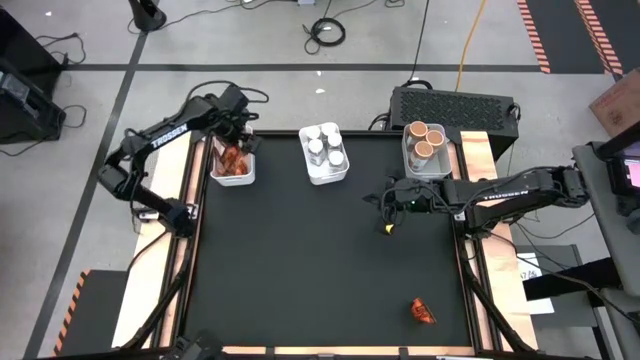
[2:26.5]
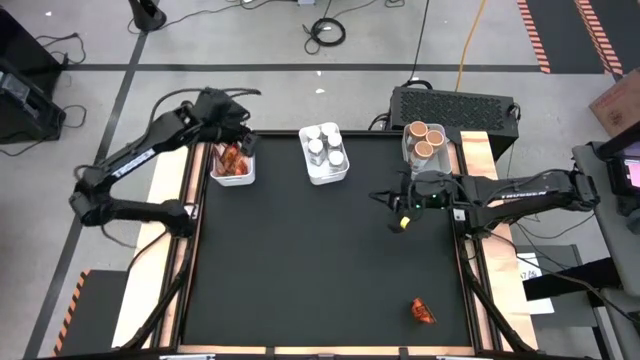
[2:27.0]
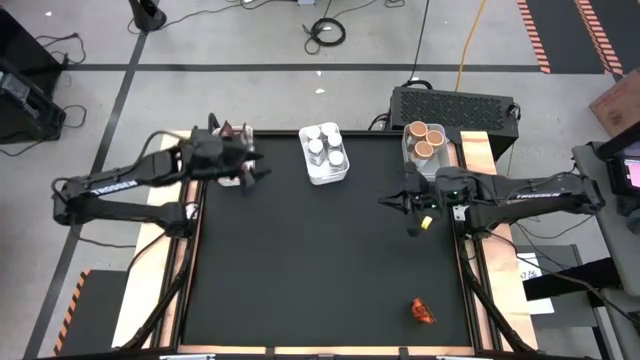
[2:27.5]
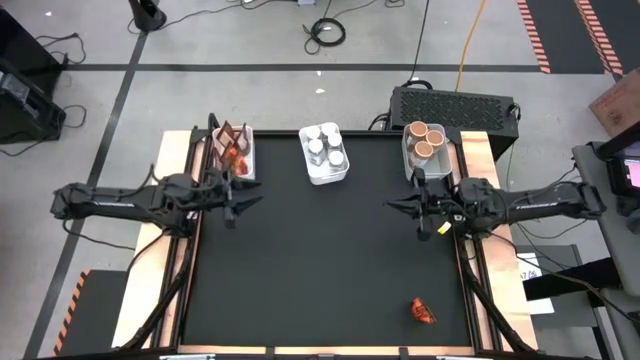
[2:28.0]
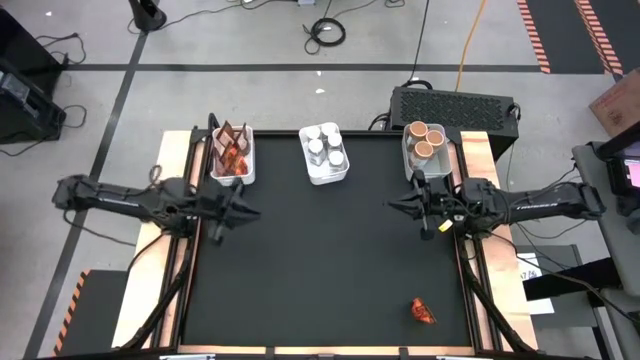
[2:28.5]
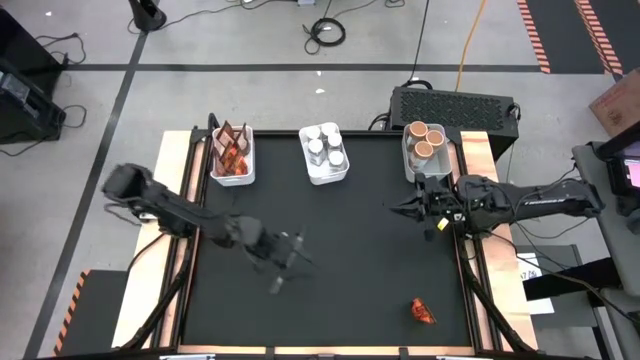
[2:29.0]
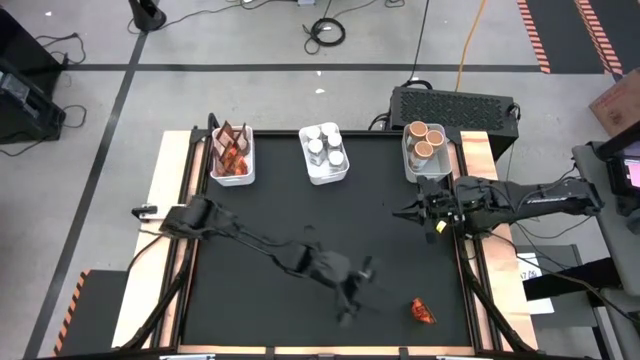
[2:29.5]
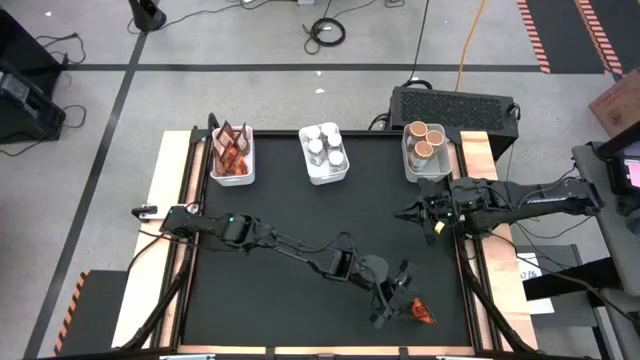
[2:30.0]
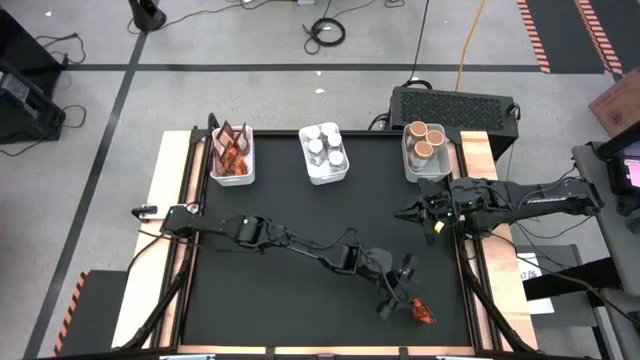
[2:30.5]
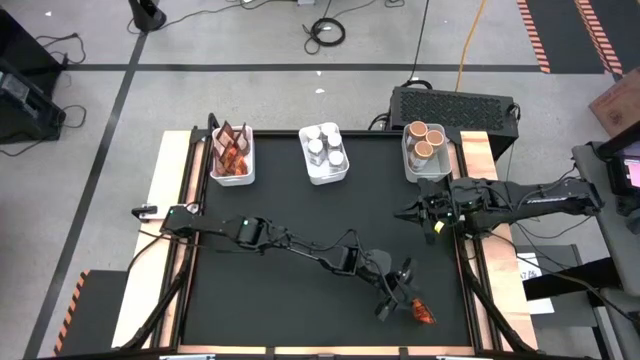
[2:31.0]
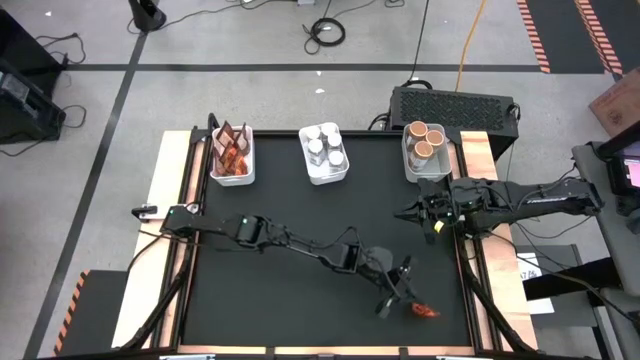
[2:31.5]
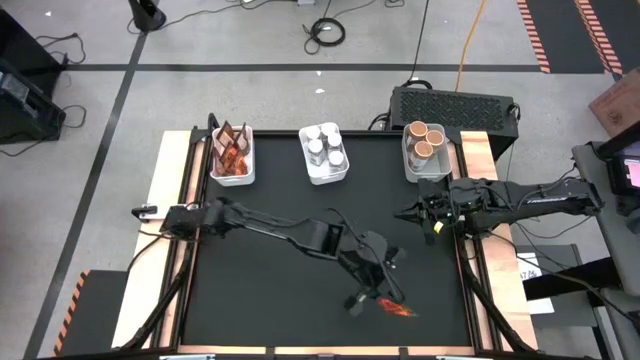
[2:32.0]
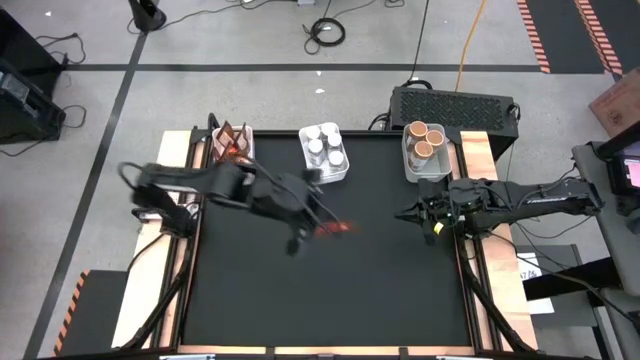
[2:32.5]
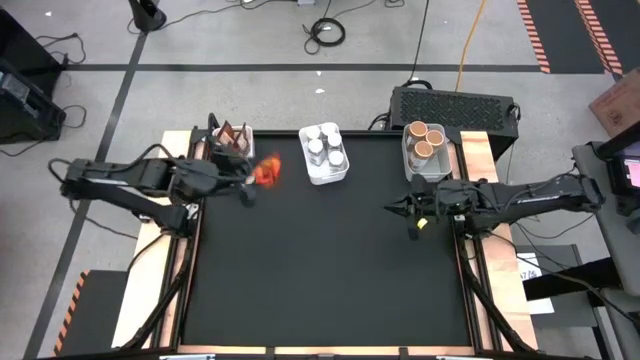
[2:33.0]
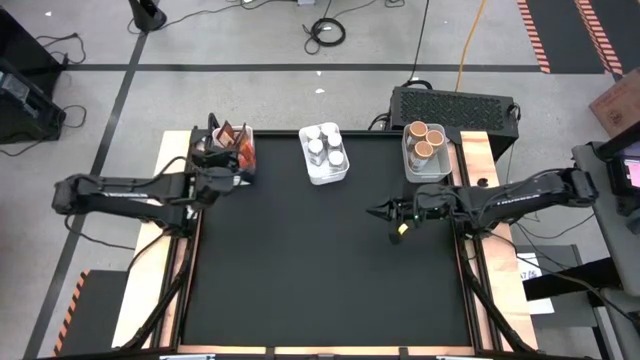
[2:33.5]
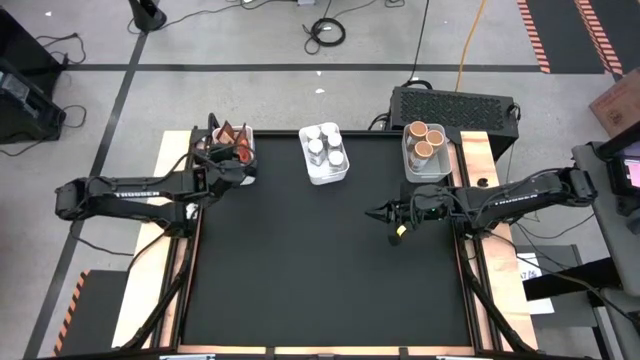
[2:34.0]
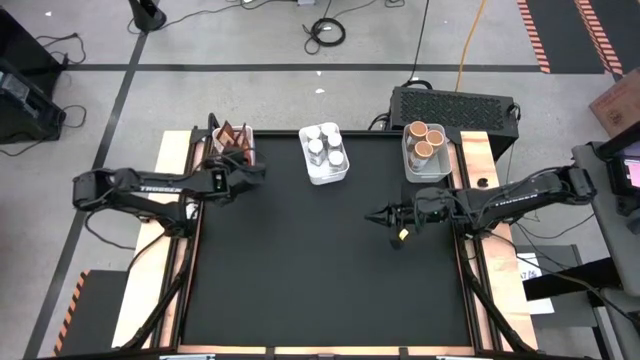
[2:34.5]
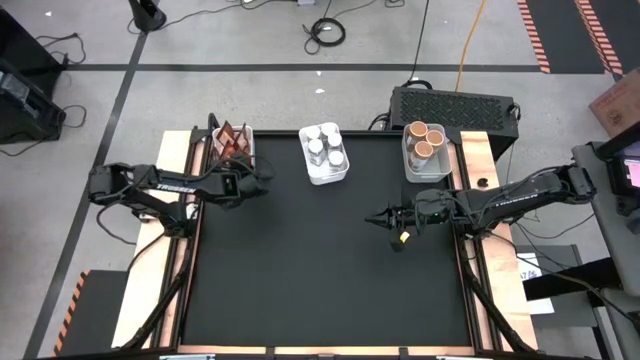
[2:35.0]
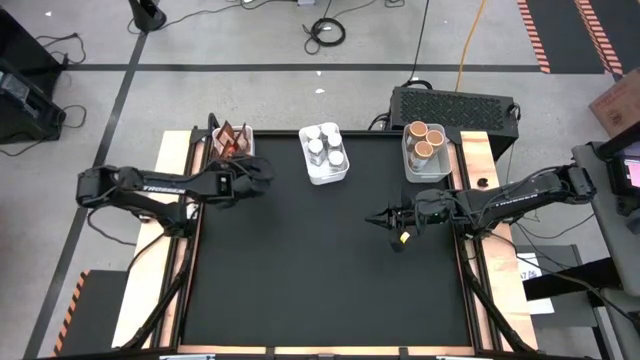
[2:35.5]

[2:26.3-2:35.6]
Task: Sort spices by type
Put the orange seasoning pack into the left white bin

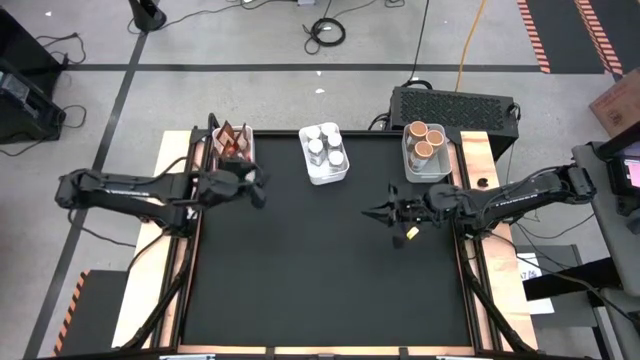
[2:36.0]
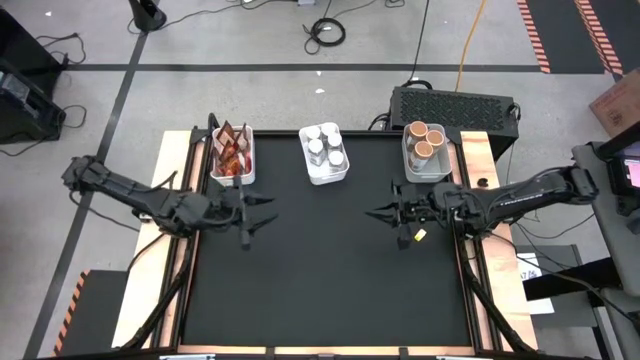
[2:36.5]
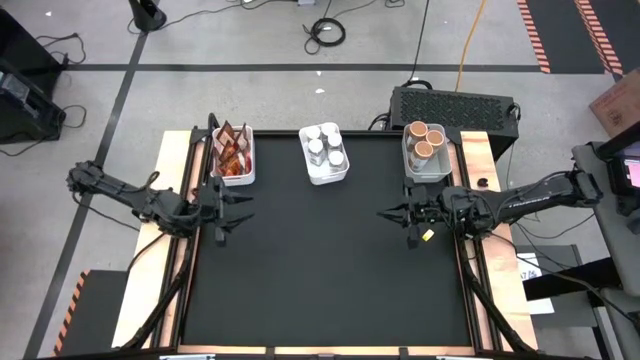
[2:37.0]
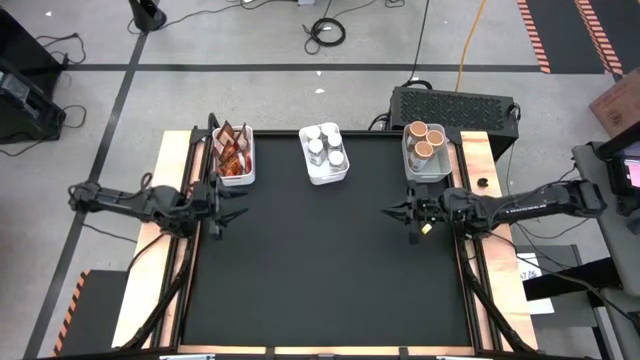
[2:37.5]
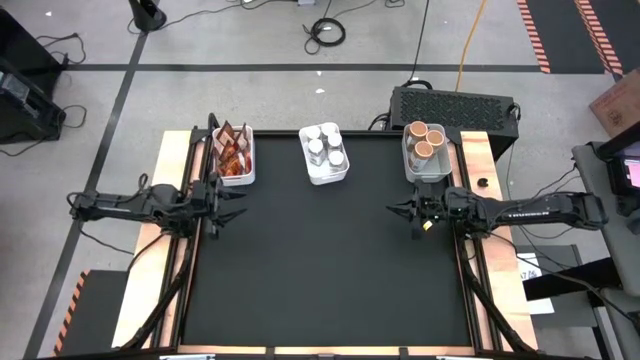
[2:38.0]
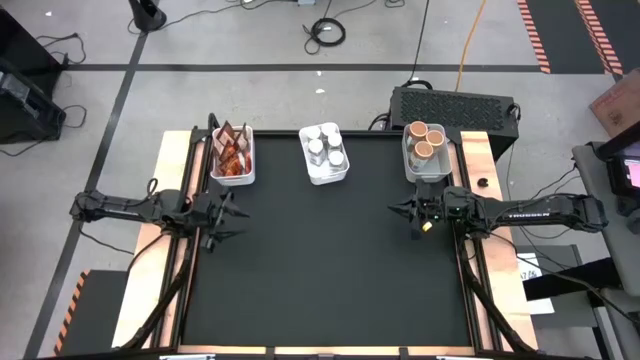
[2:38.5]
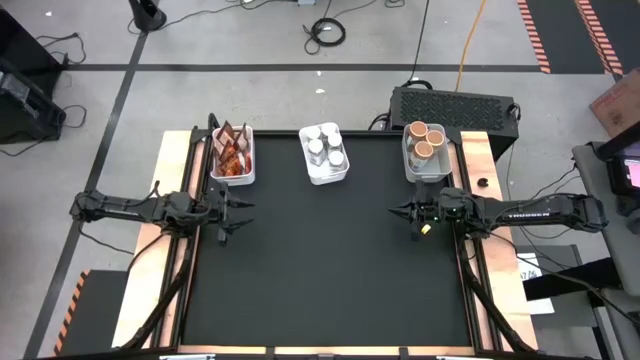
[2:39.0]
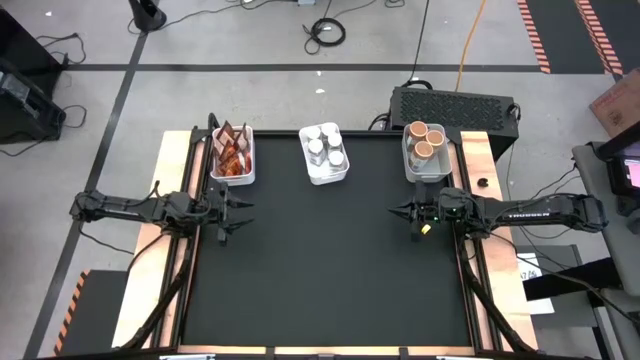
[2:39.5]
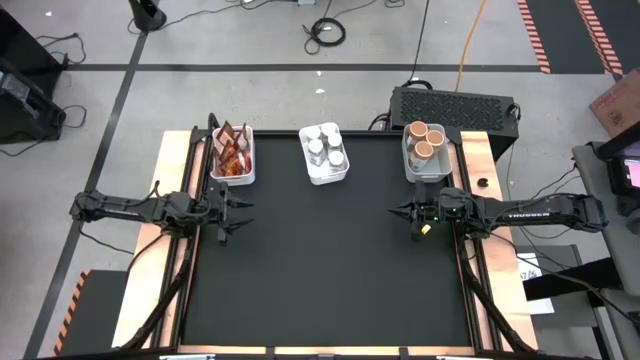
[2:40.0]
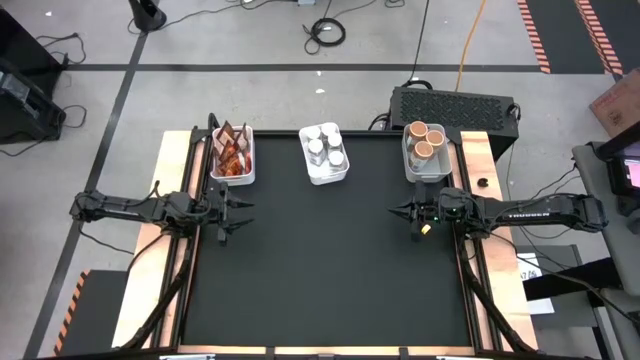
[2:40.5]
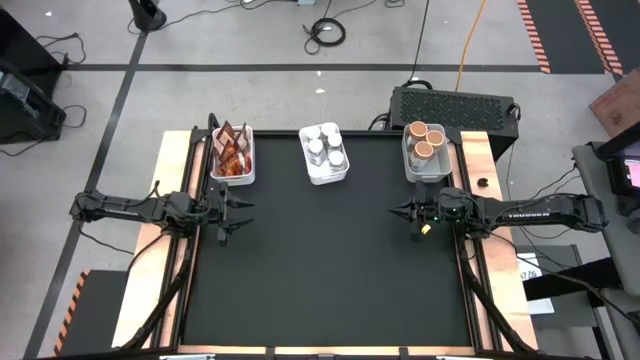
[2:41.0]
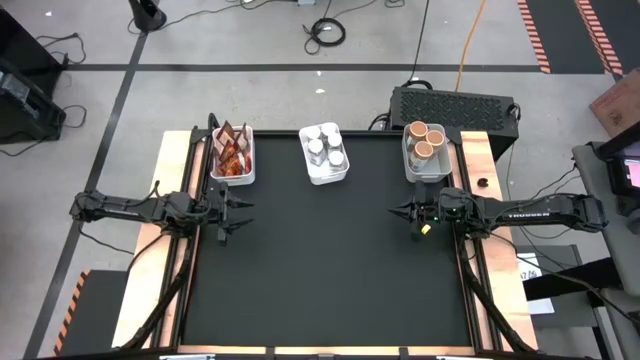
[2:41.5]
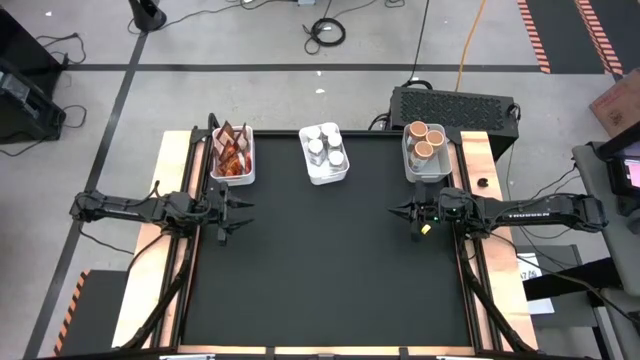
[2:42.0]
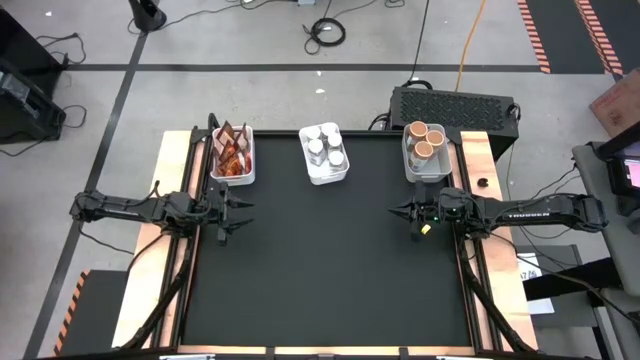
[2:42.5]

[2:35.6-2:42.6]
Return to Home Position

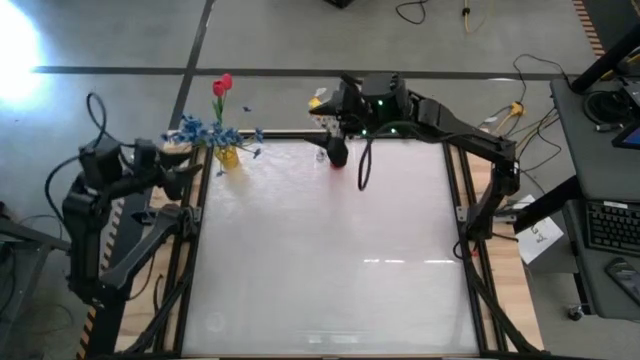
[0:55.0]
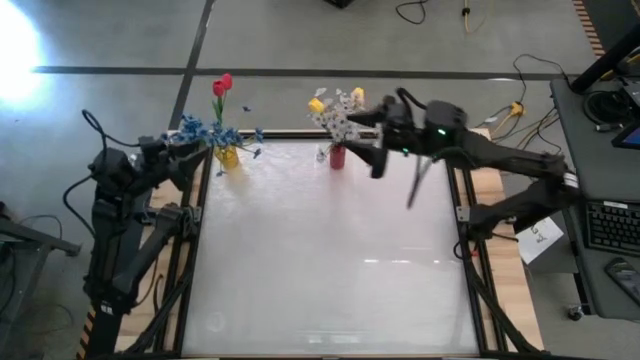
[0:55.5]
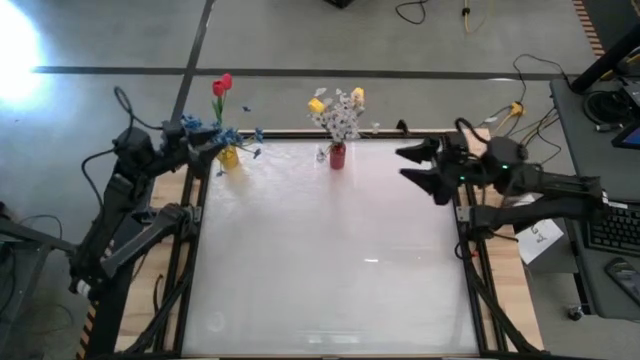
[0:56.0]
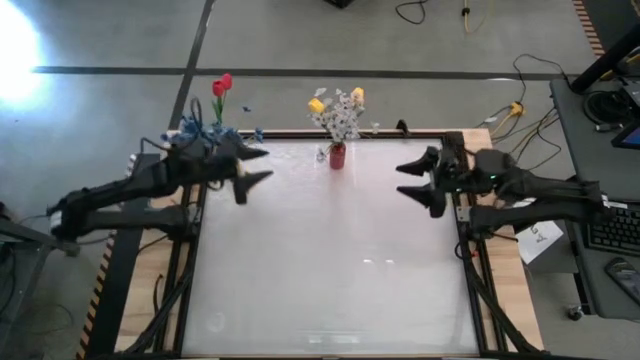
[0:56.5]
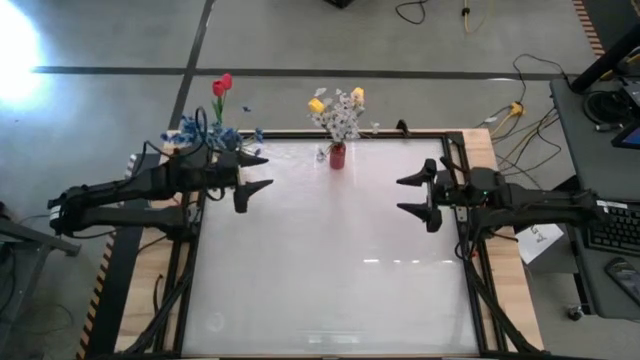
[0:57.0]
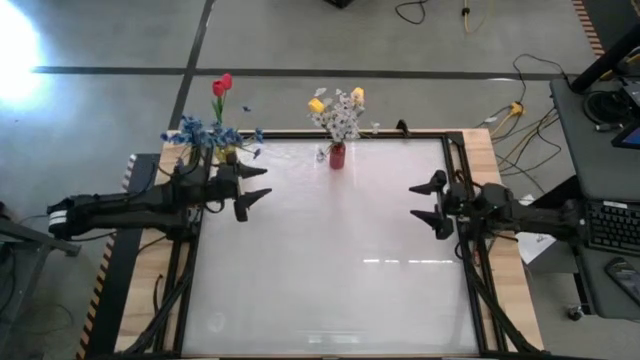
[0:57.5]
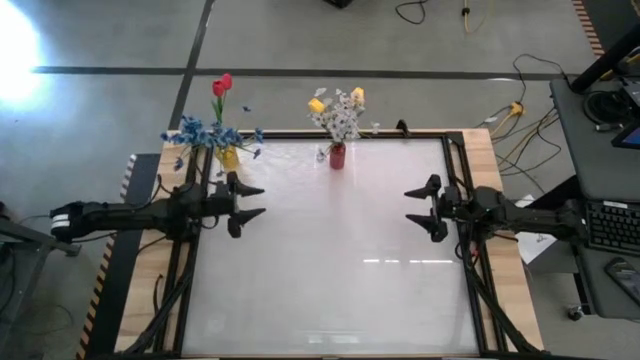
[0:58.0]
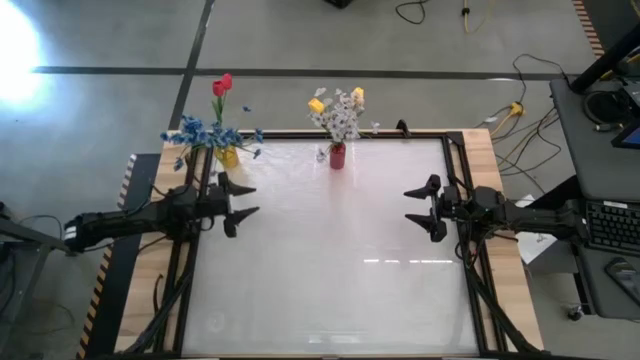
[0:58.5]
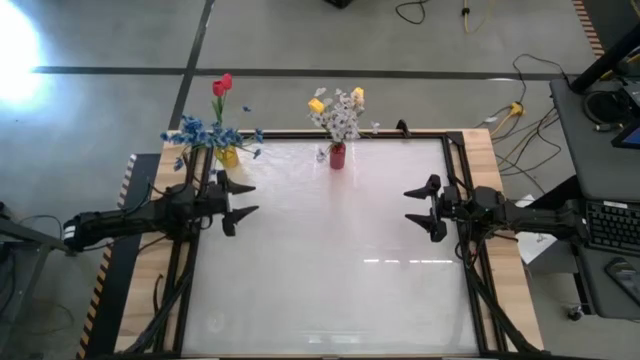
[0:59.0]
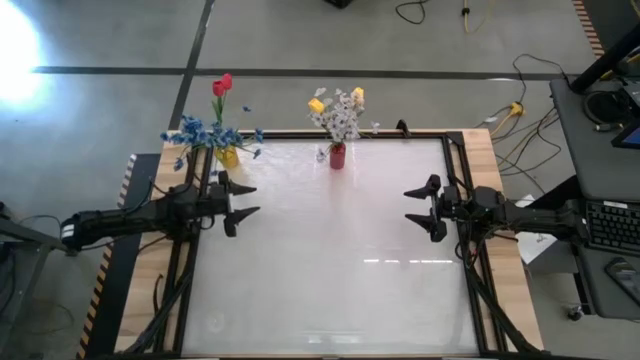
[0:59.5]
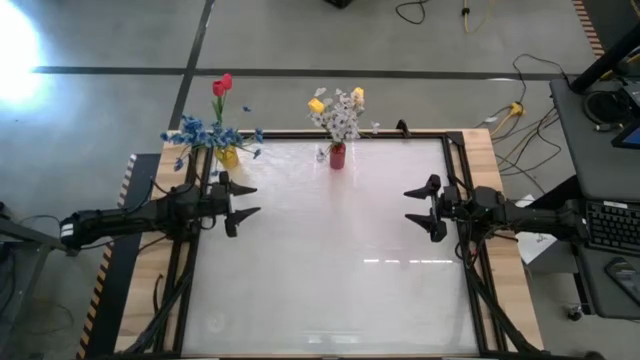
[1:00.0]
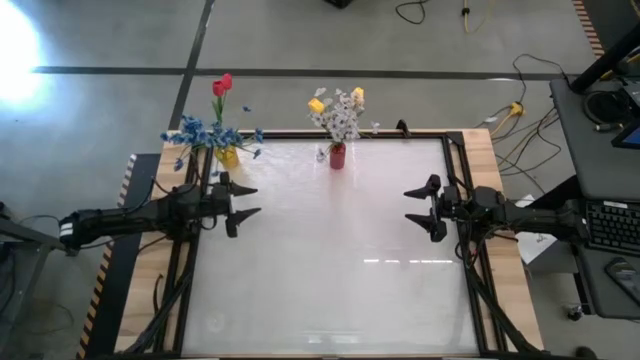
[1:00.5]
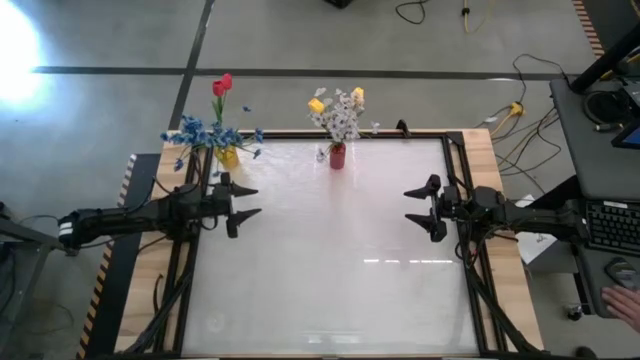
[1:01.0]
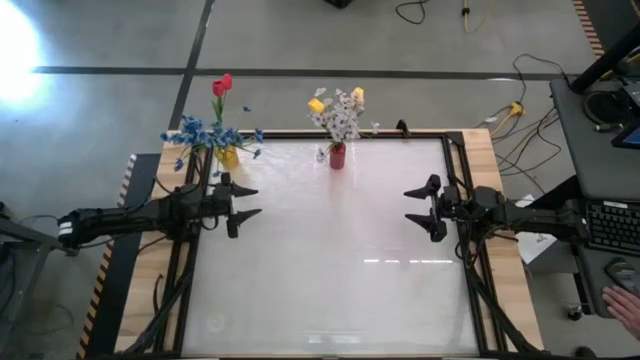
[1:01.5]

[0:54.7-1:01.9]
Task: Sort flowers into vase by color
Return to Home Position
